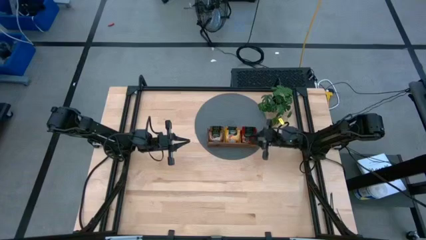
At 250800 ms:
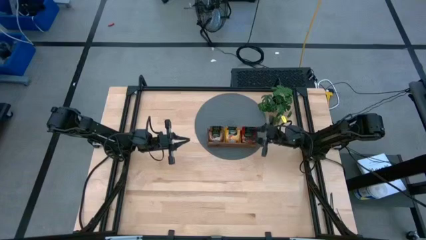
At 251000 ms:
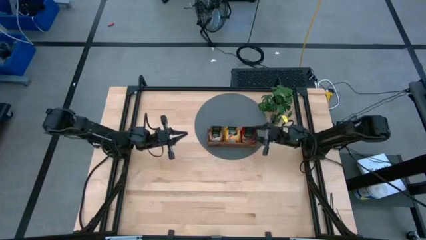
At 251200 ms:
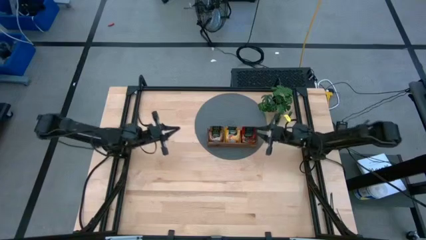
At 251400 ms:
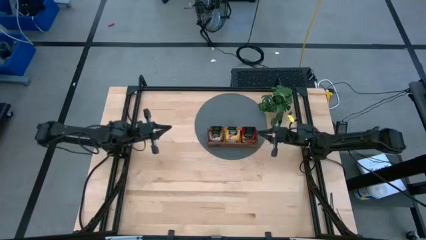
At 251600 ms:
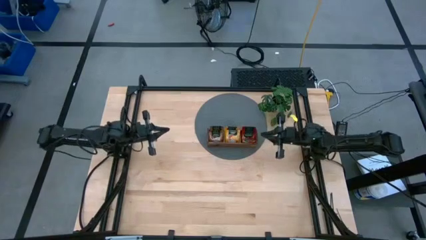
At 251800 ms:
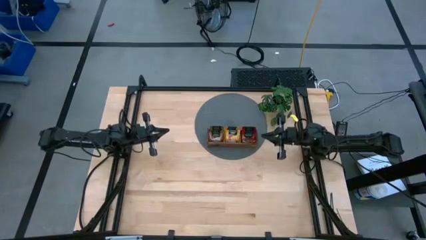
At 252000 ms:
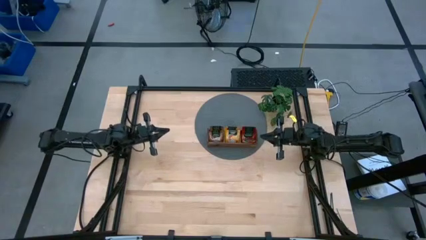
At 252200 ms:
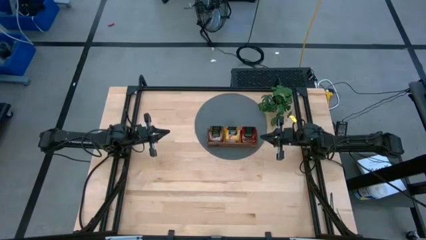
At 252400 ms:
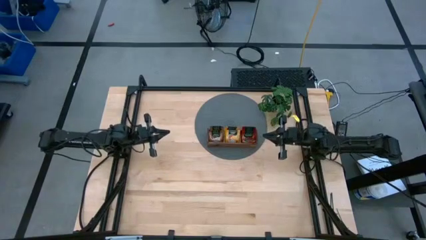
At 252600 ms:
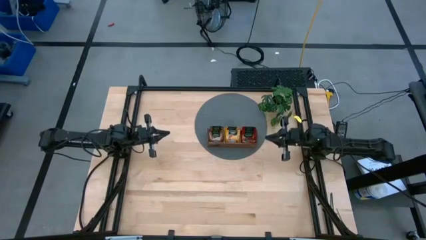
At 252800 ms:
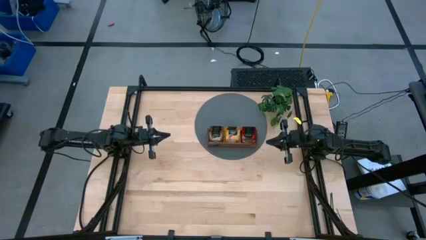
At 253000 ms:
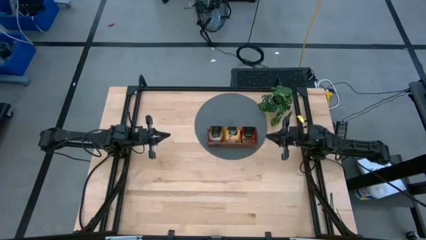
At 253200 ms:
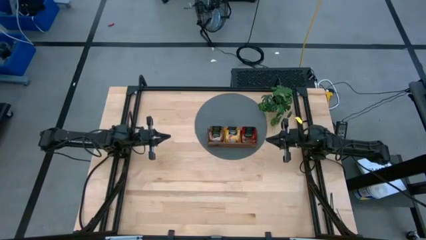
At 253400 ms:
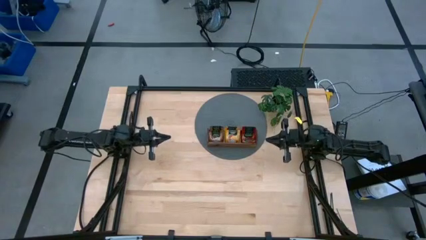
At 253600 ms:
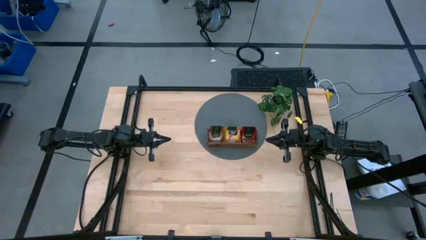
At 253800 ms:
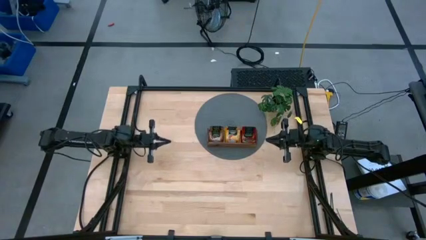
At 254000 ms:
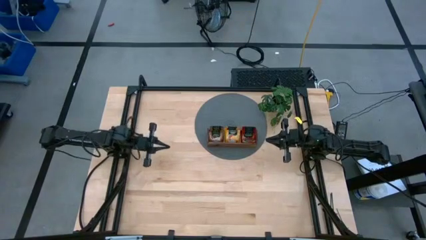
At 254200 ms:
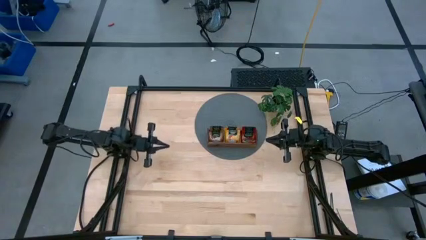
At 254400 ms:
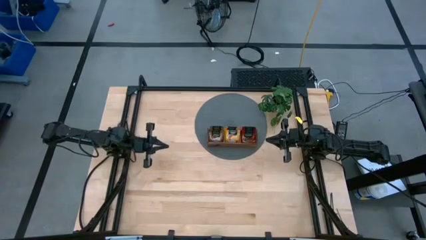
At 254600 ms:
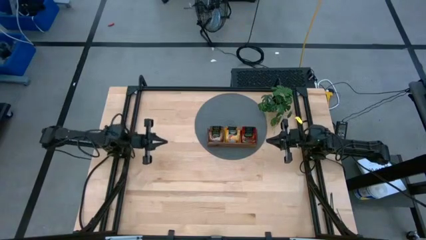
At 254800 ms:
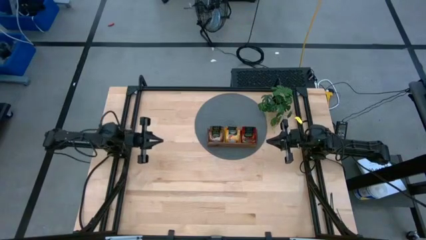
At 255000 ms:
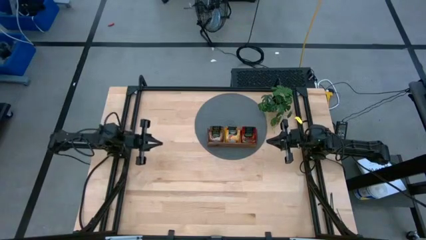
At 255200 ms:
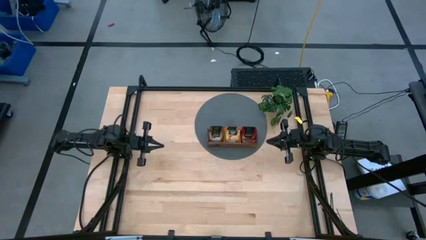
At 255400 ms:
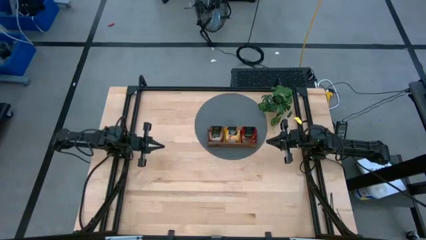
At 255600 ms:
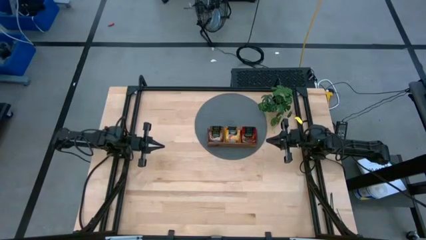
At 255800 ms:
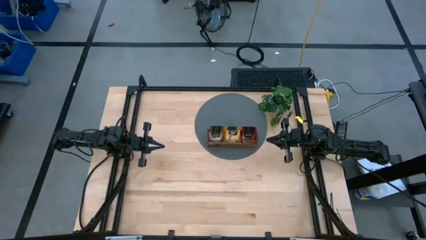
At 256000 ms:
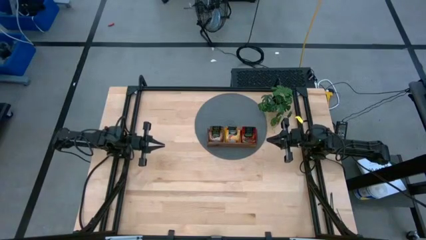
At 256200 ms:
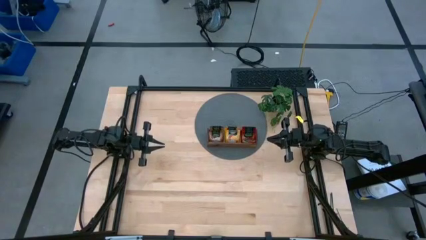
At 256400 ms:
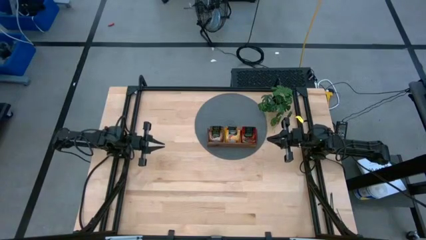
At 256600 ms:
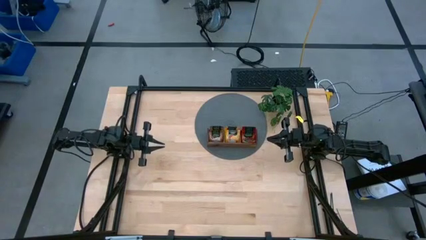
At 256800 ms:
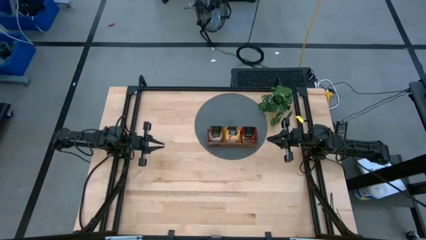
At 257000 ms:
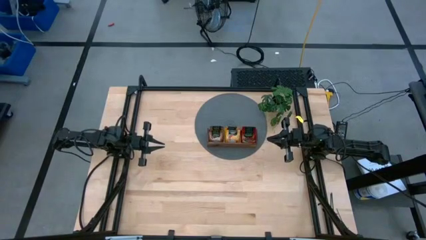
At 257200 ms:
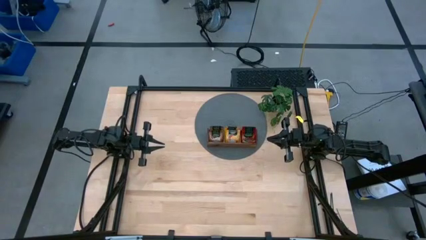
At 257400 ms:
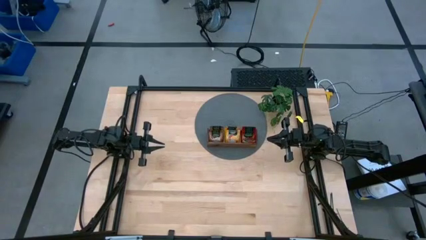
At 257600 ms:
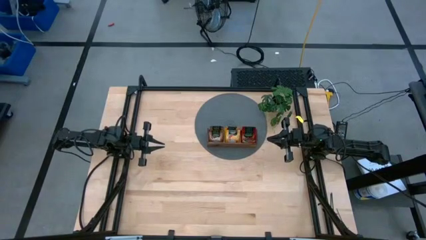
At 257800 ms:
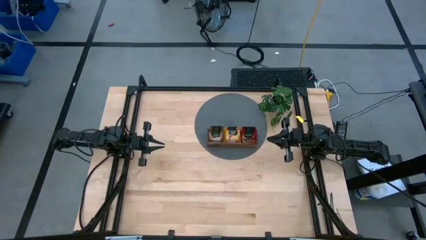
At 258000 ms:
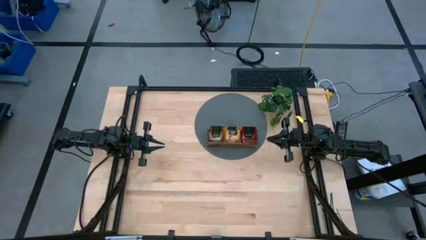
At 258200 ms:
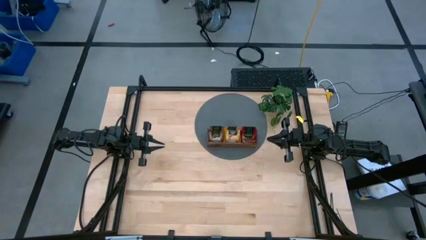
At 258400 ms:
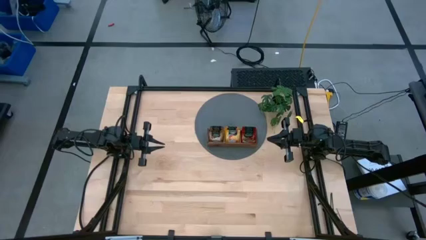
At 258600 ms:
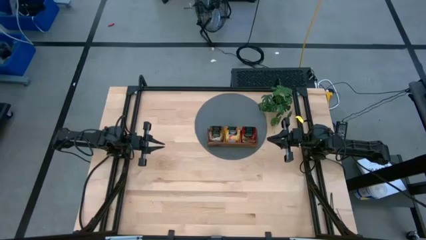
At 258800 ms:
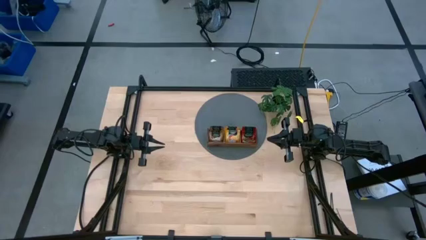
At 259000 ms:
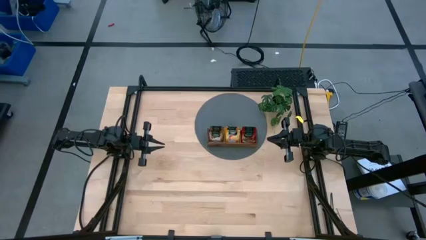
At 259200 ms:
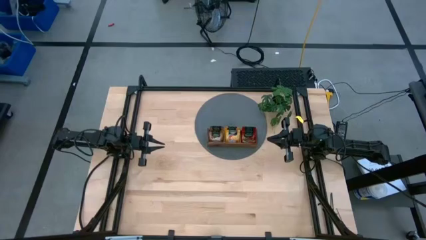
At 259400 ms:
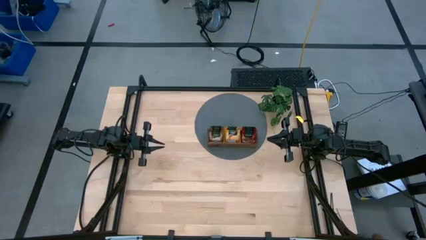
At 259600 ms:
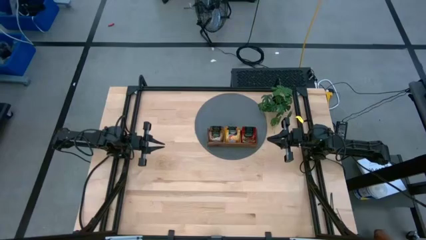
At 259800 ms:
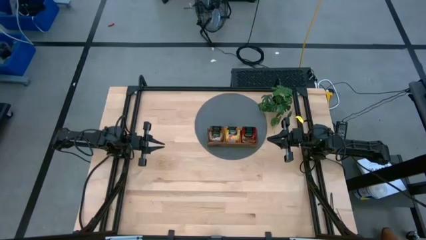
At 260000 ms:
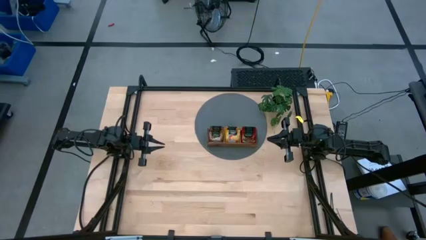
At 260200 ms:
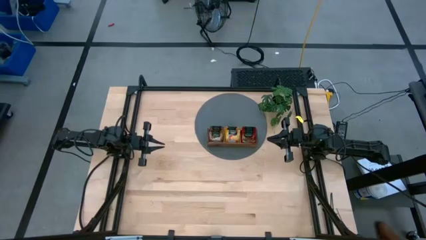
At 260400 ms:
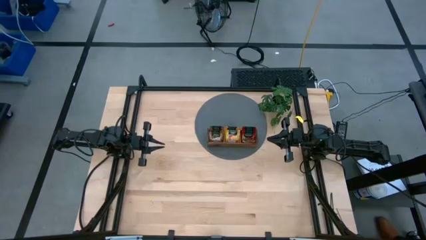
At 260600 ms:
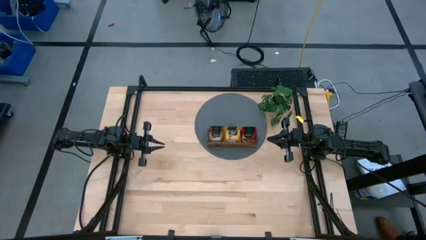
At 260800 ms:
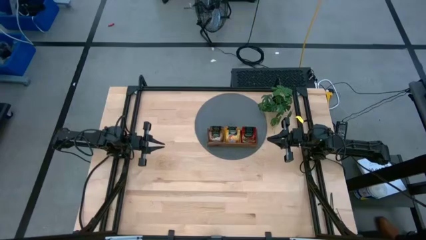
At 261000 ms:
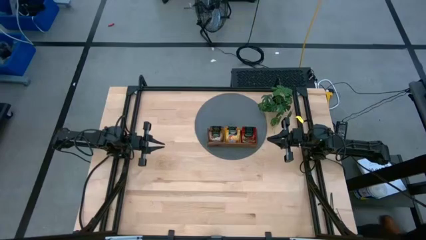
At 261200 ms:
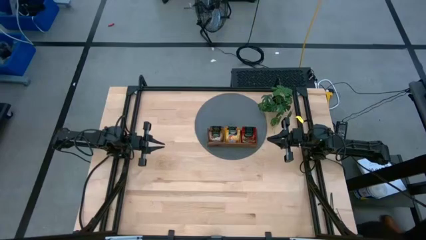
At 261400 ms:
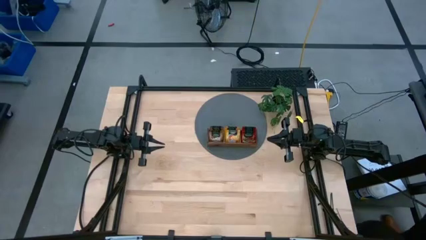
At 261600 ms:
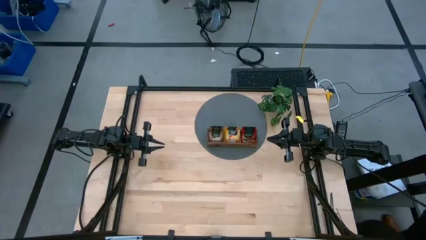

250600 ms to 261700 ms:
Task: Pick & Place Tea
Return to Home Position
